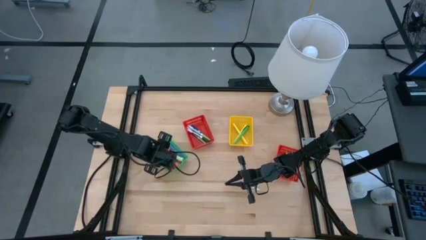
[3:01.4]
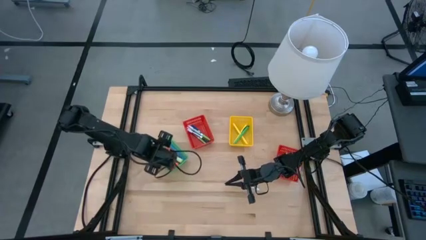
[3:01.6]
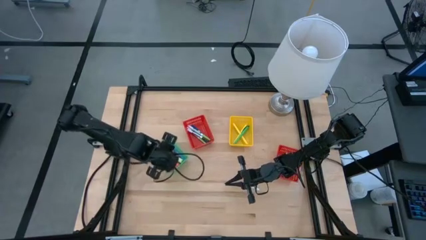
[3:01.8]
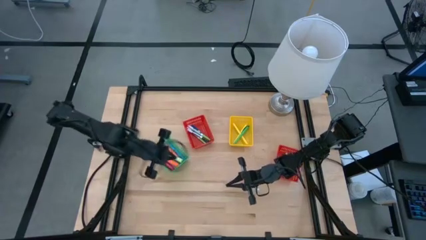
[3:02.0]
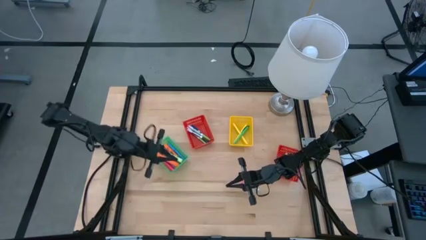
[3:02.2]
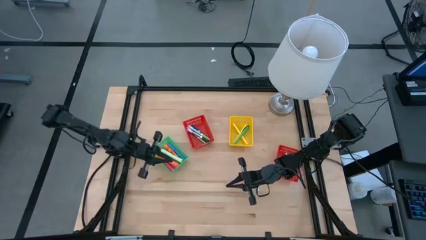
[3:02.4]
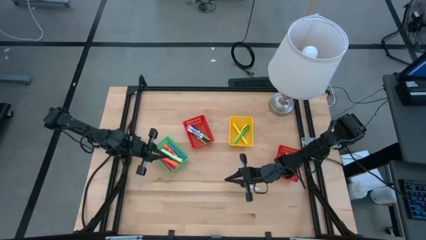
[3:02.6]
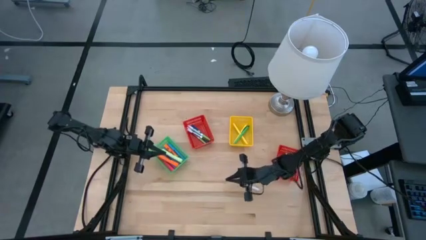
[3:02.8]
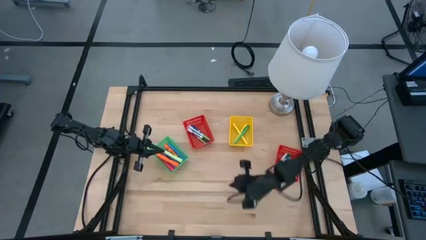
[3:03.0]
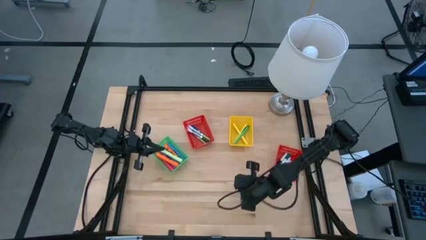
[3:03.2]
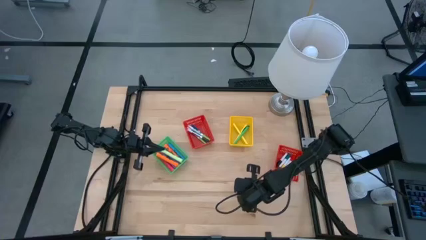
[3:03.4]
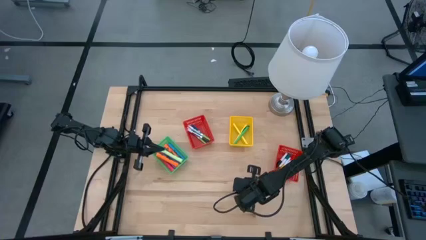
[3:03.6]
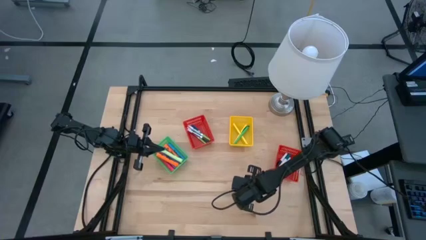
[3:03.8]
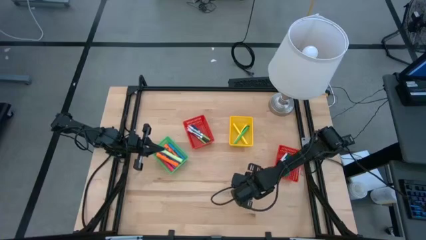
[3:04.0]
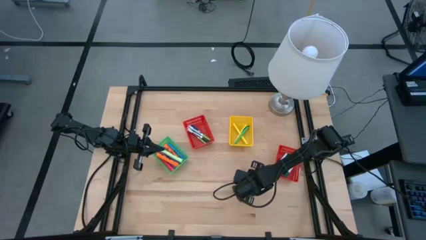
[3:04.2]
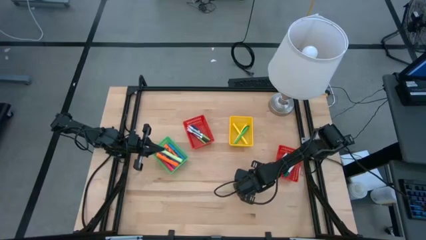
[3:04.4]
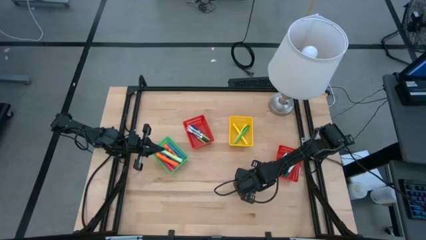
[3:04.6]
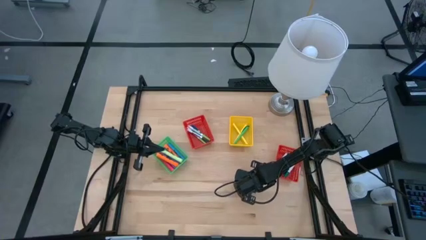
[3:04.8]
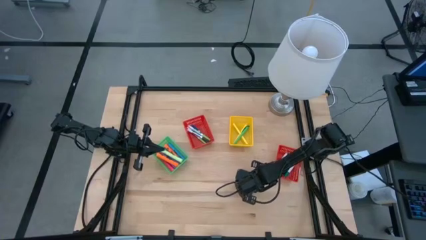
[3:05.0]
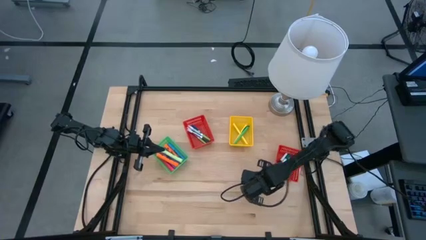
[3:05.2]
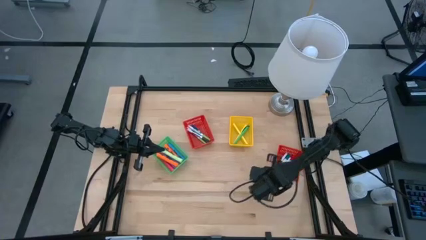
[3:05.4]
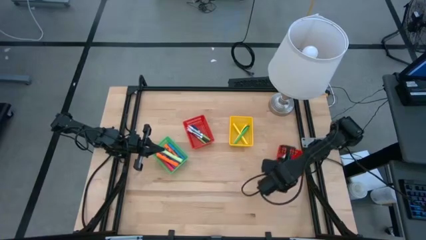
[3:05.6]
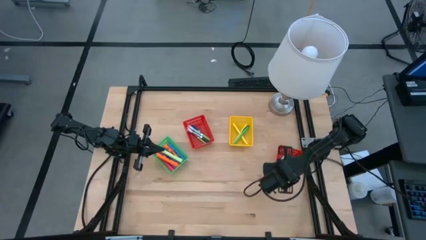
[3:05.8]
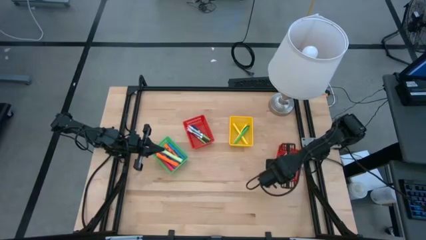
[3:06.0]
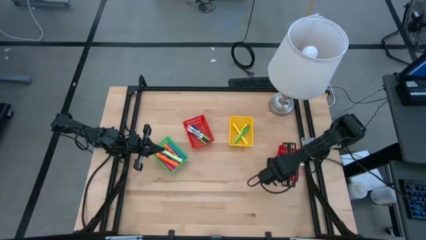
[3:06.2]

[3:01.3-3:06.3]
Task: Pick & Place Markers
Put the small pink highlighter pen into the right red bin

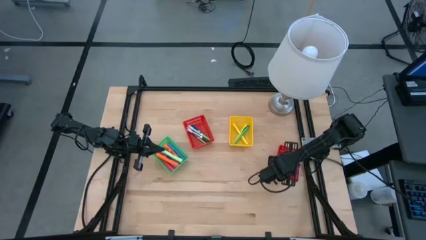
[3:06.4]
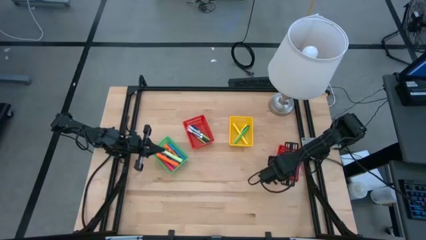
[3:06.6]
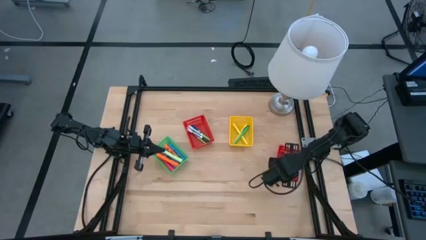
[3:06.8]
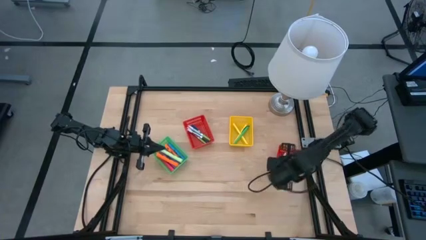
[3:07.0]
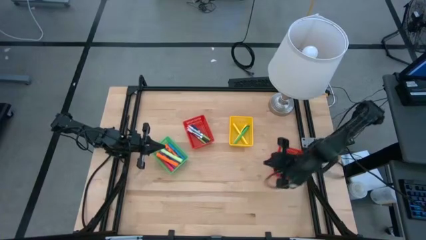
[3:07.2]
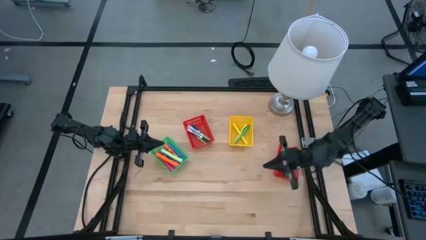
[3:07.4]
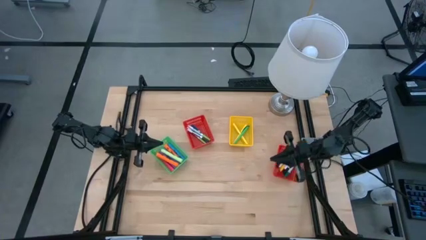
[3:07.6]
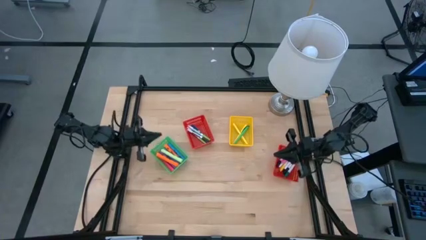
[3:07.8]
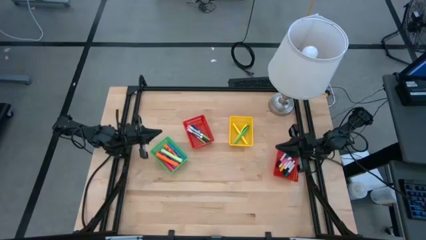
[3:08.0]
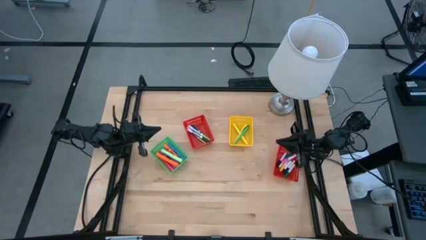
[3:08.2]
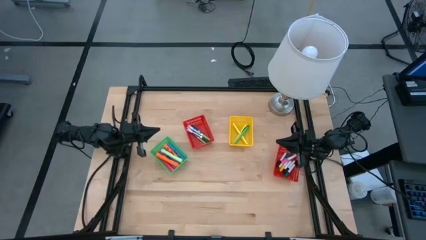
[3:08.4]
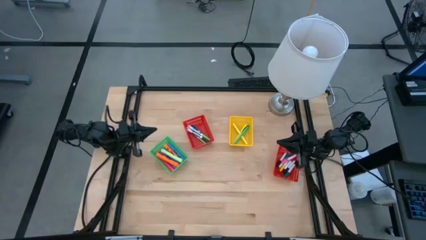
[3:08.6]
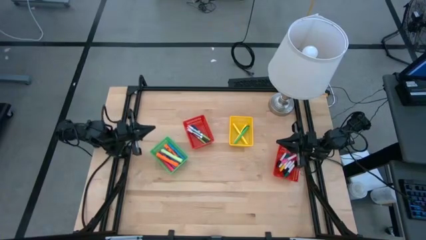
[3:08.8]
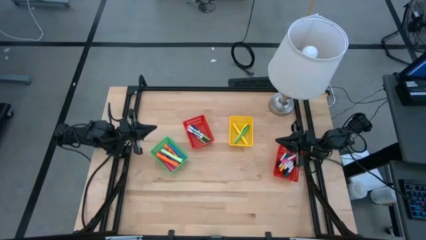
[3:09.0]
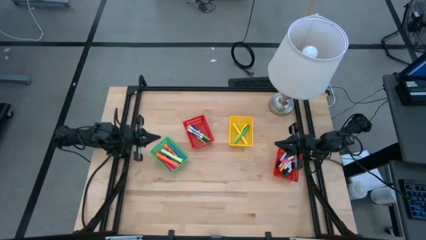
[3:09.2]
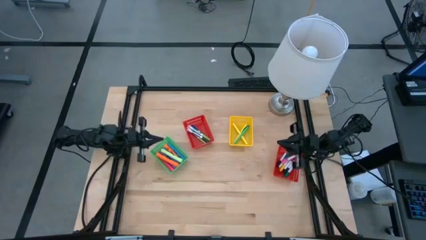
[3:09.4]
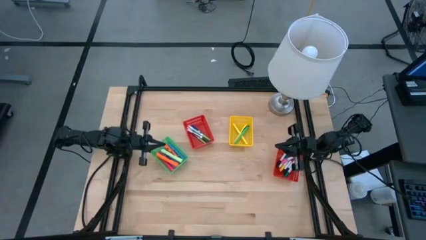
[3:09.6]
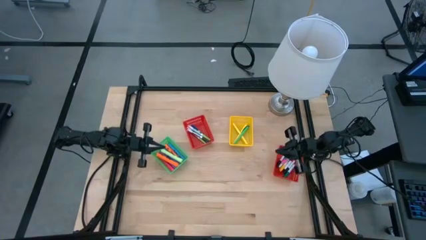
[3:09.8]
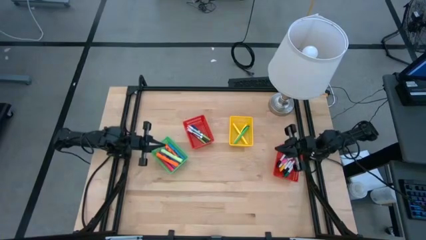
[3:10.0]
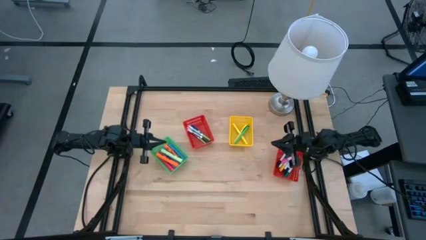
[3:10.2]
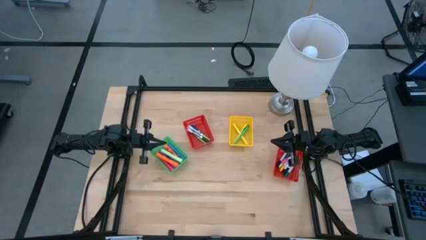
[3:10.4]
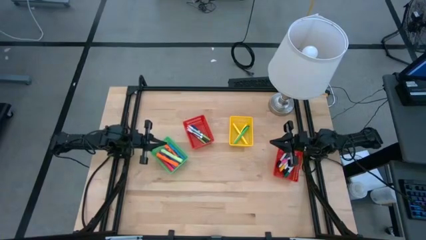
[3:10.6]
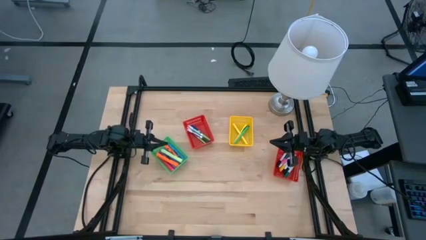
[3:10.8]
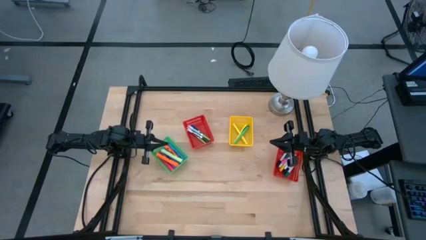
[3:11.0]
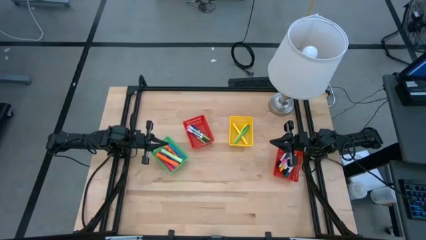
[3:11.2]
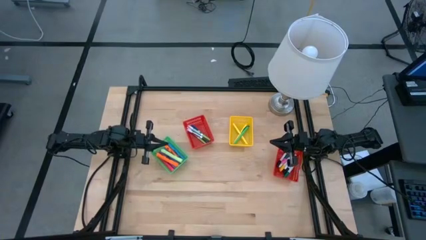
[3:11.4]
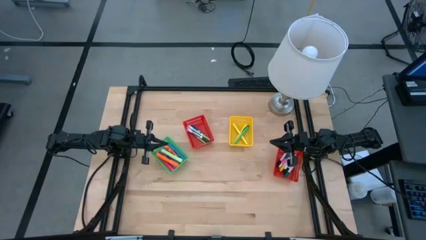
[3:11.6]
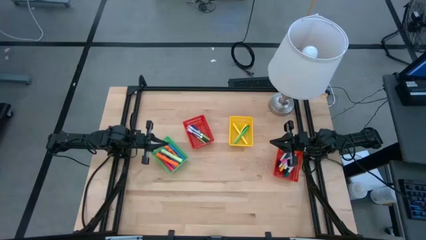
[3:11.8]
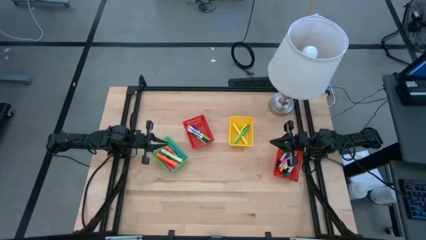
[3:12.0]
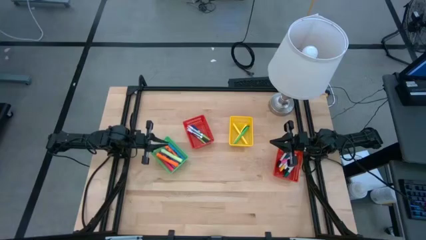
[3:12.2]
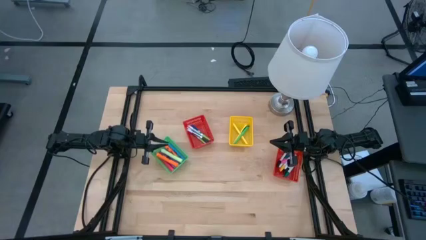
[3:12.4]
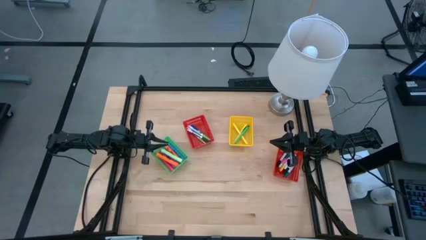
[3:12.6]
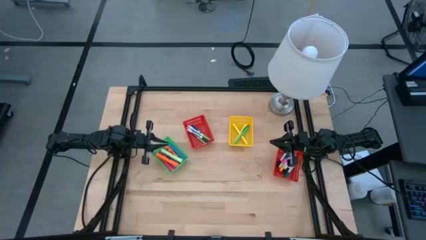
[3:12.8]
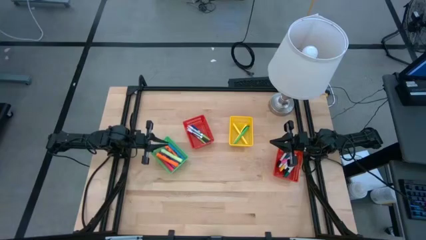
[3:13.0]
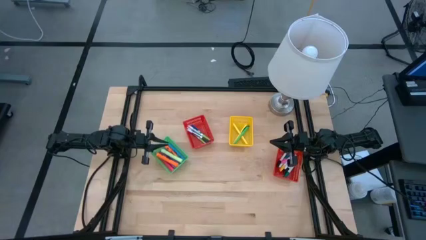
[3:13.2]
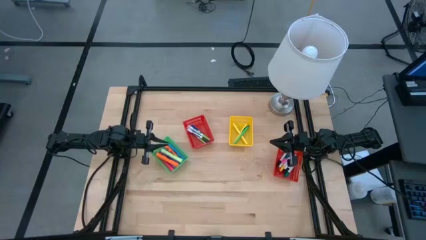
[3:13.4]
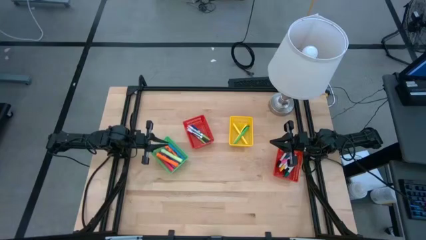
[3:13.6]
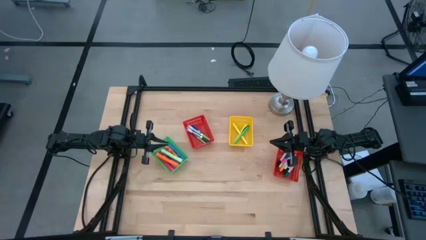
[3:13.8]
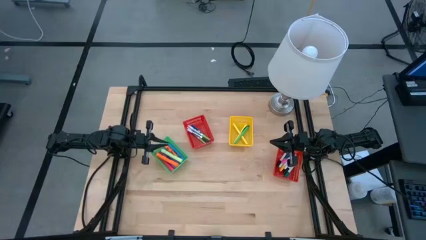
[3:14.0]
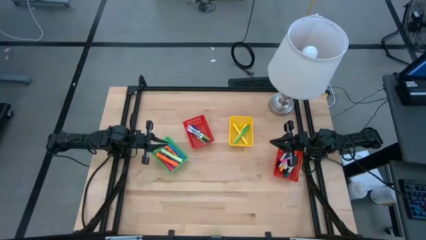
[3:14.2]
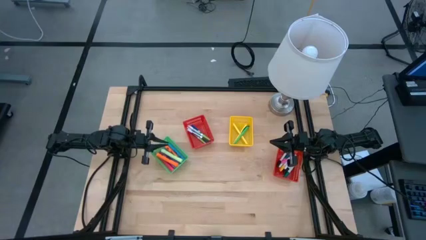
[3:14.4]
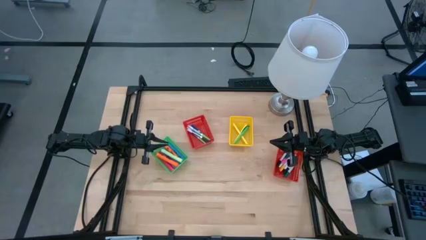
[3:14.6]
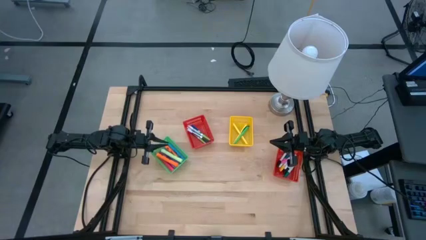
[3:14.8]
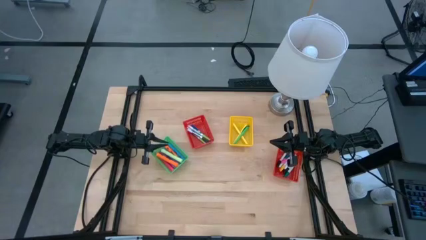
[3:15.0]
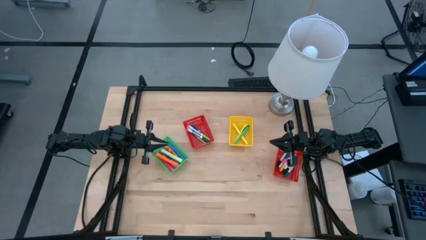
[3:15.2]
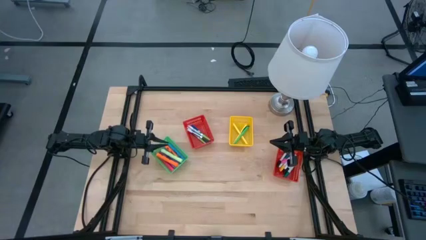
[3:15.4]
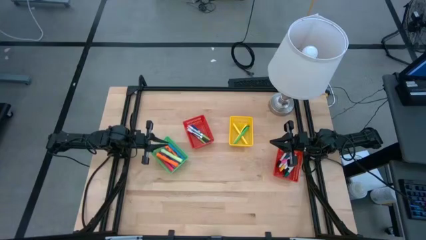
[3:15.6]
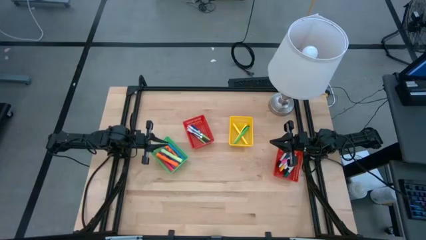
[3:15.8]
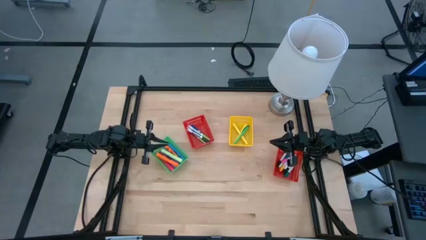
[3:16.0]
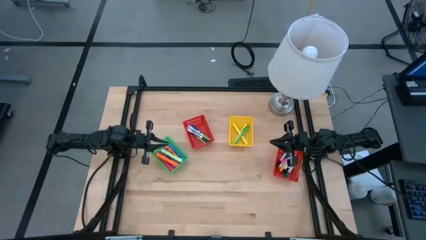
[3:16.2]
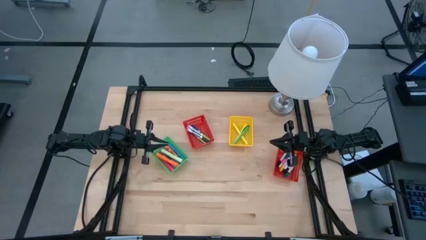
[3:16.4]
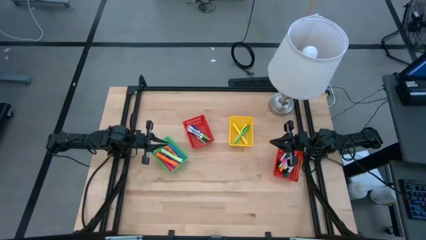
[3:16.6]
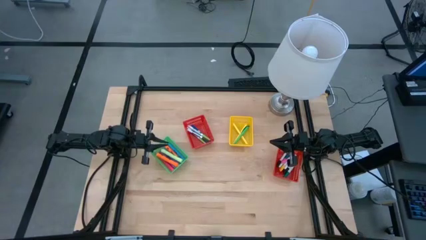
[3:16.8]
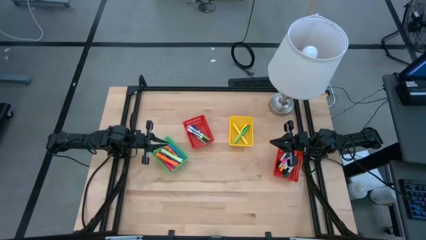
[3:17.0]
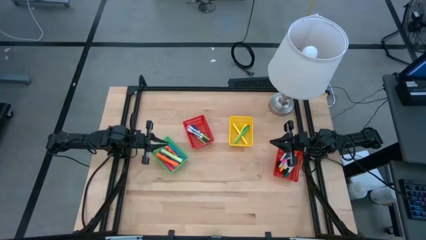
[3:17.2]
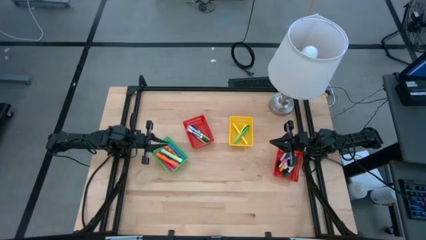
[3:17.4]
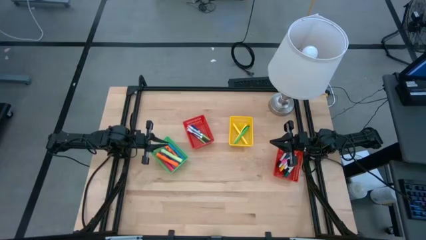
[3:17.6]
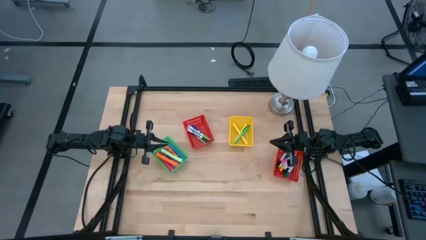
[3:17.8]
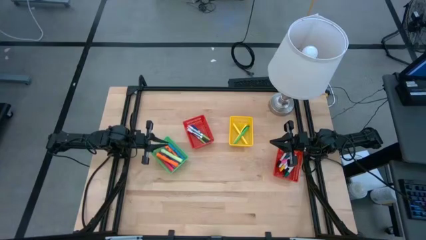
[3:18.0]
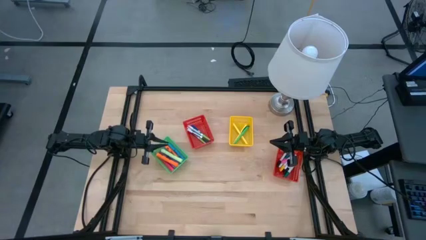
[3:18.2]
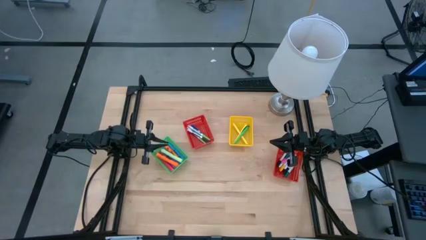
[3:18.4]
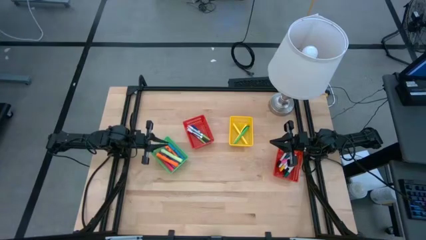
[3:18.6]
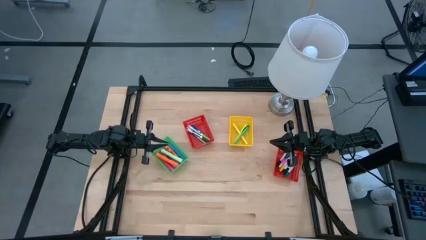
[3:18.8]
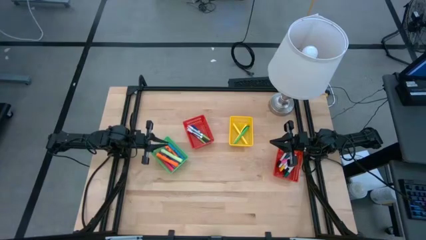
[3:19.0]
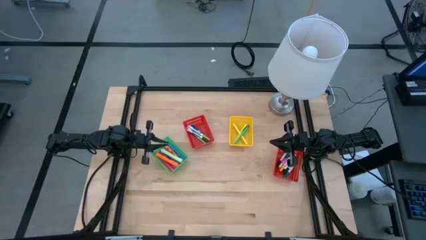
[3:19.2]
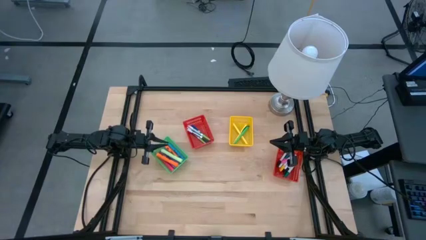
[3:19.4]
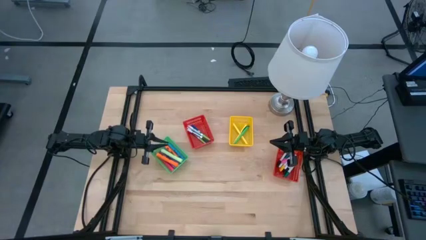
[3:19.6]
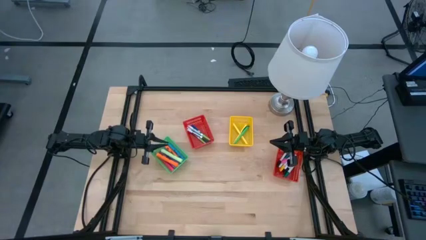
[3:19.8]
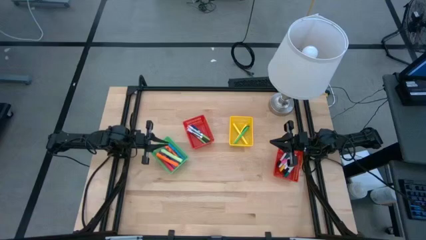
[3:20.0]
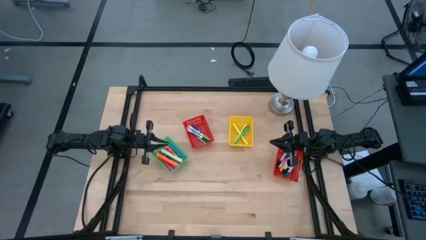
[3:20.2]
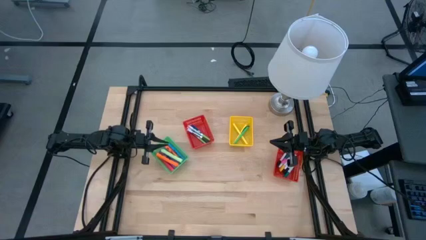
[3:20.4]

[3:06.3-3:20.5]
Return to Home Position
